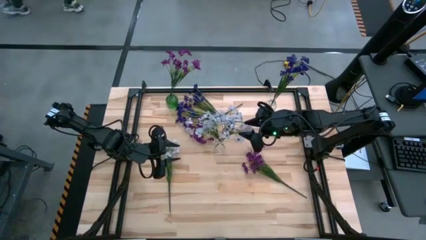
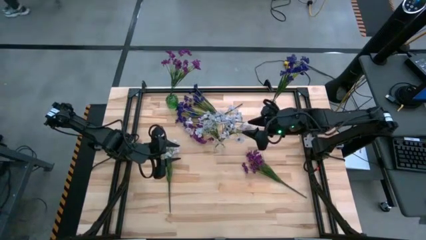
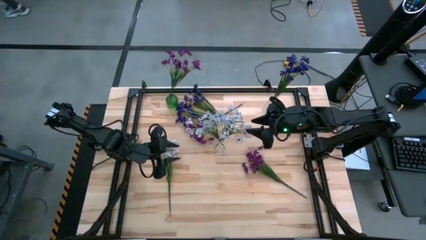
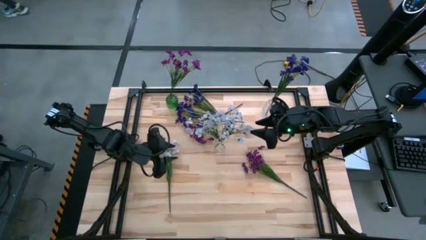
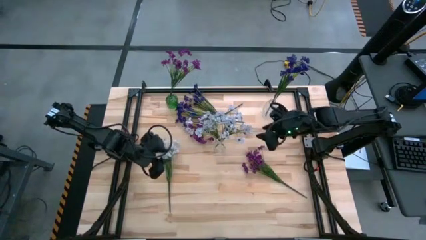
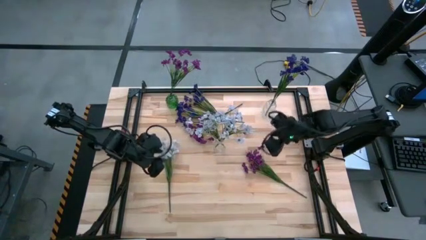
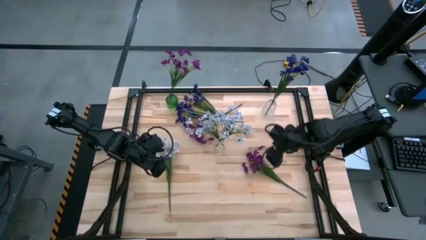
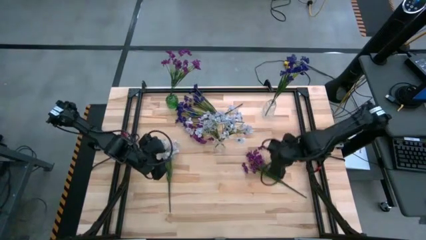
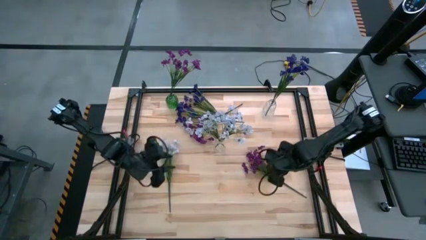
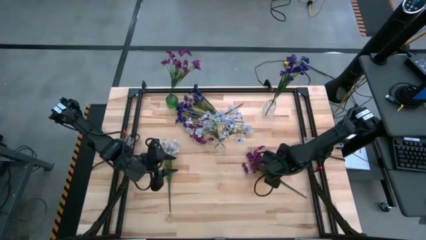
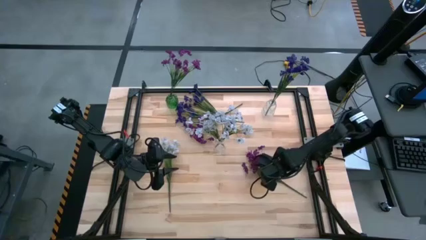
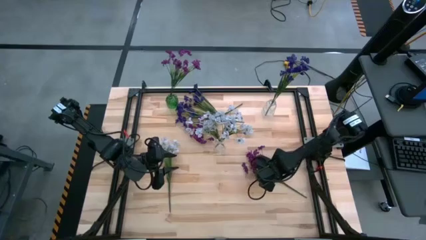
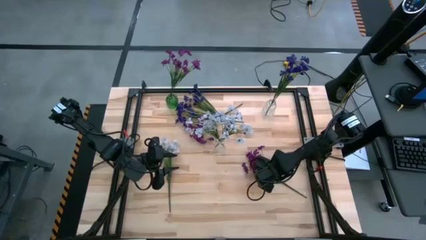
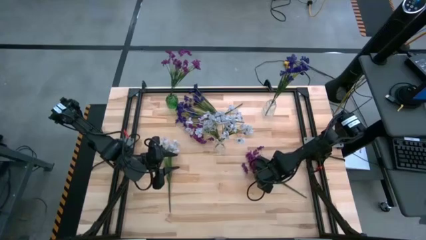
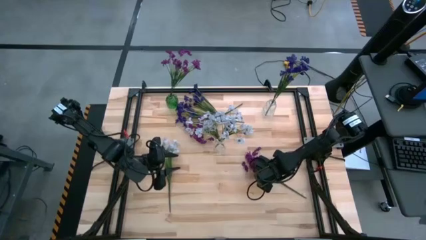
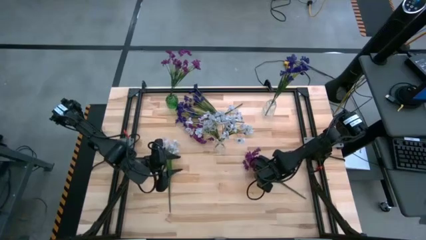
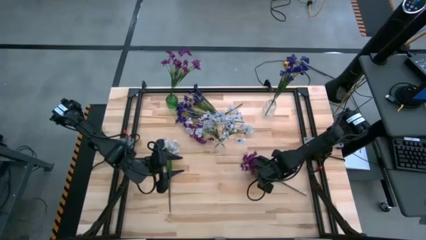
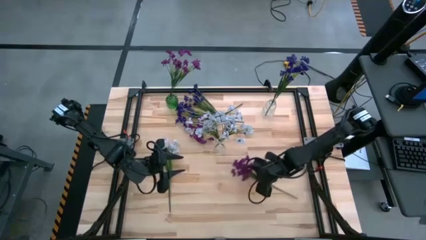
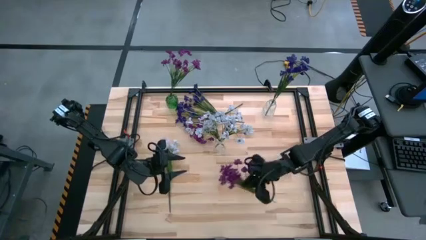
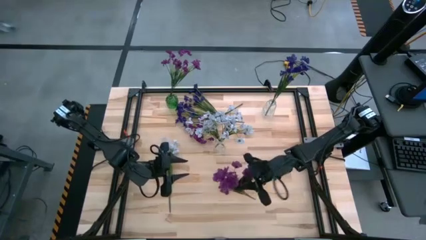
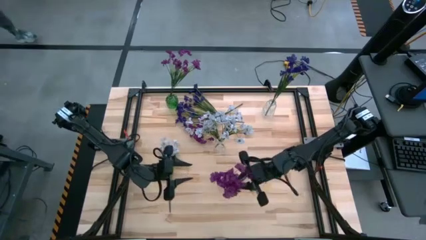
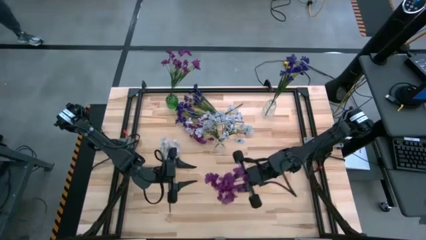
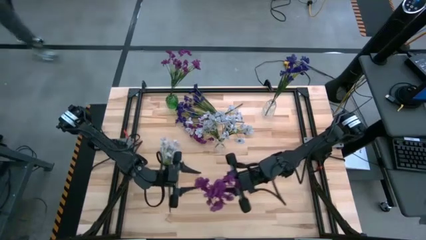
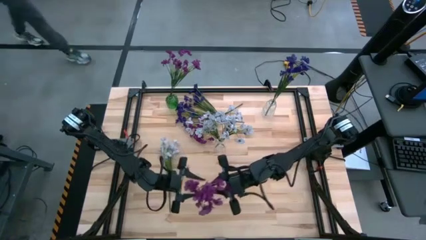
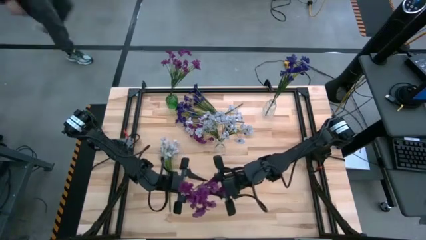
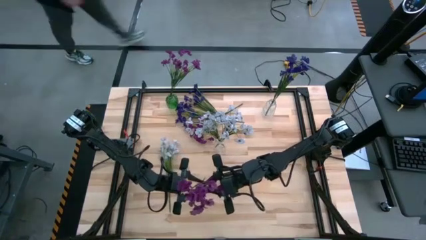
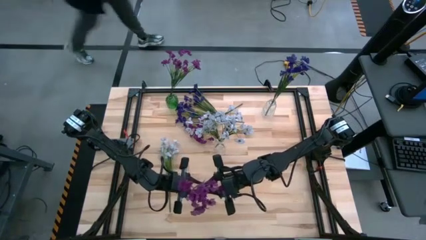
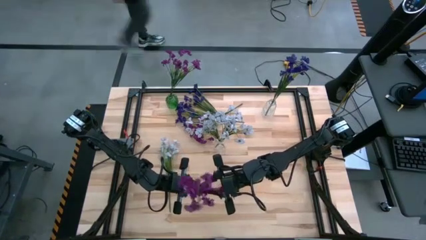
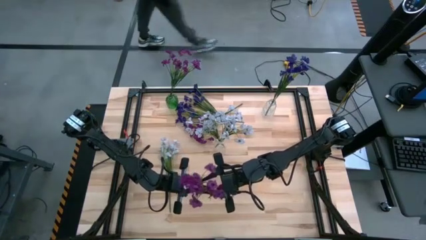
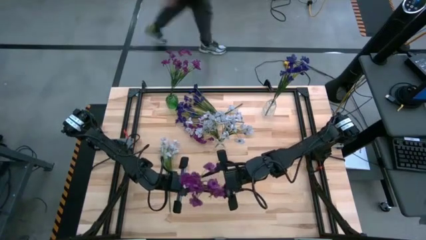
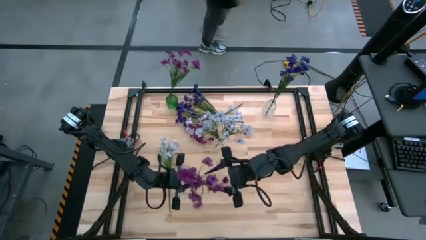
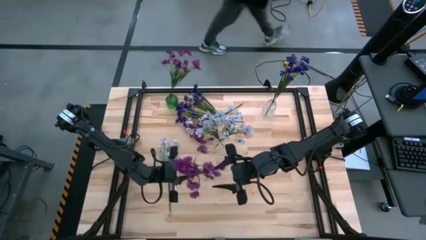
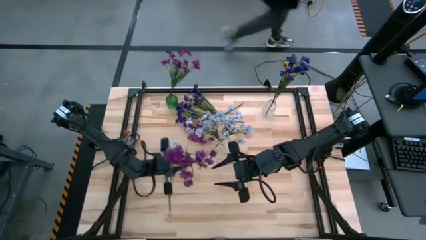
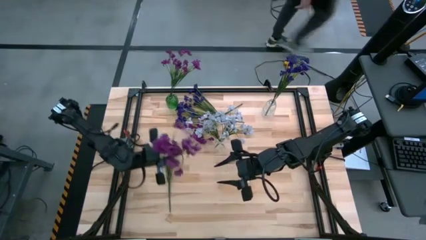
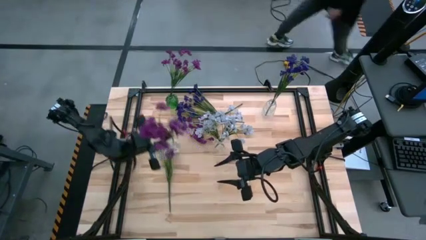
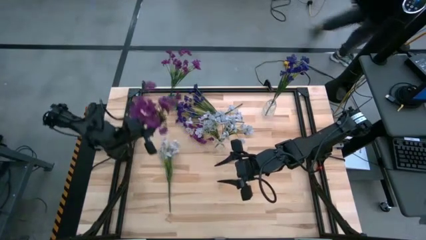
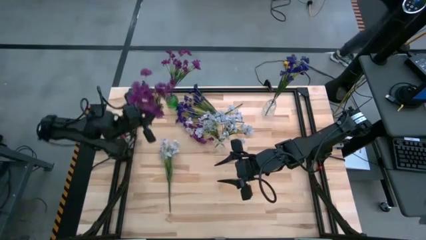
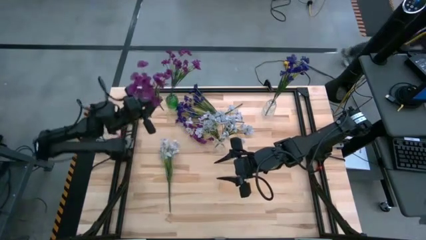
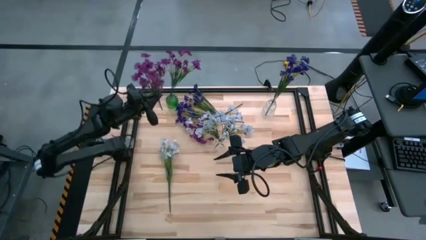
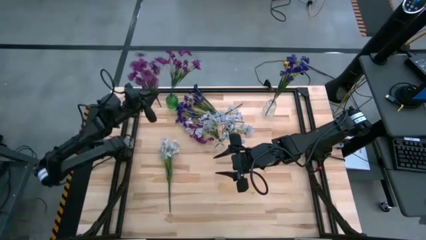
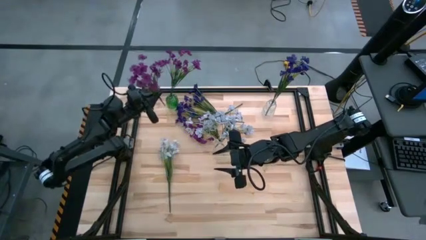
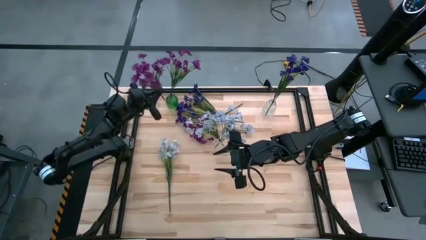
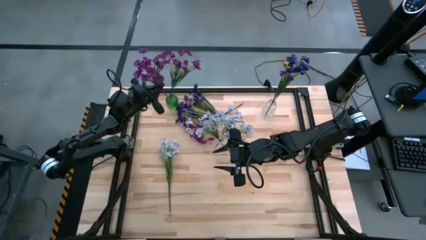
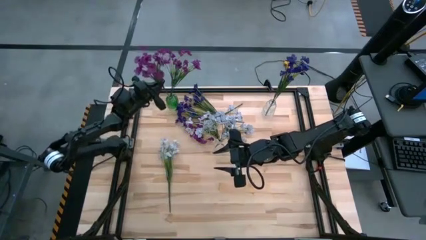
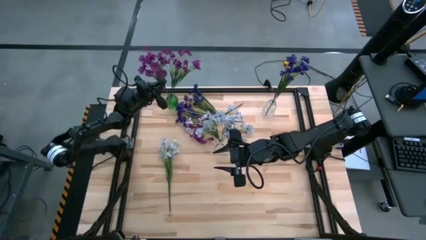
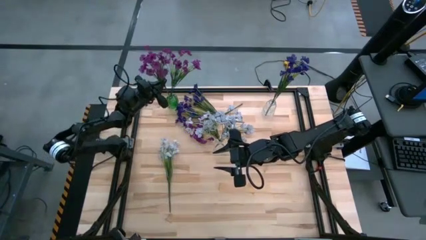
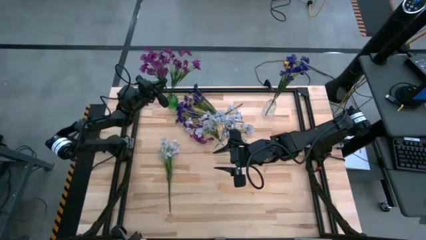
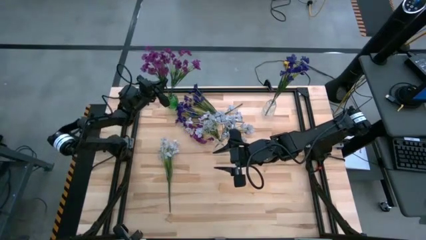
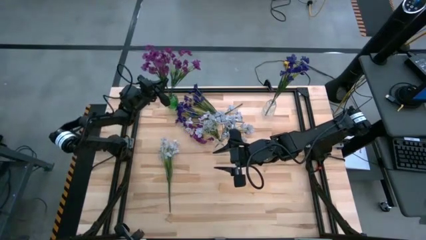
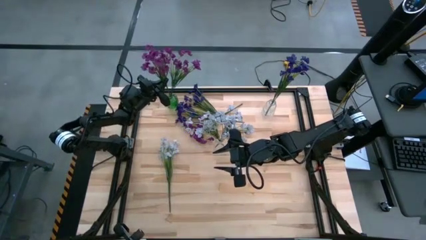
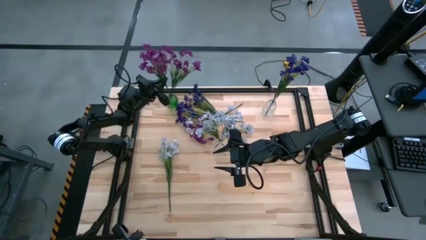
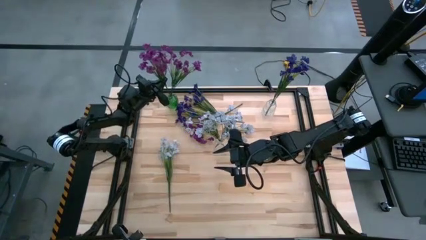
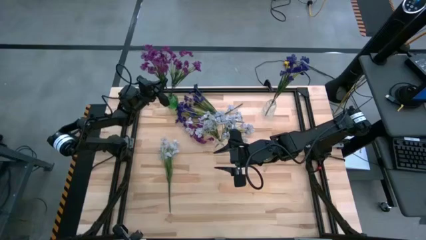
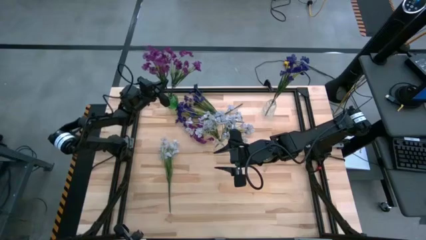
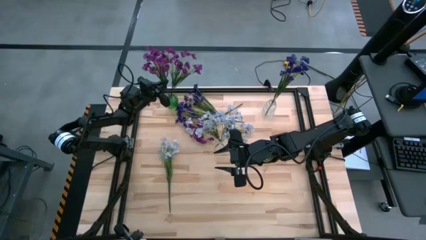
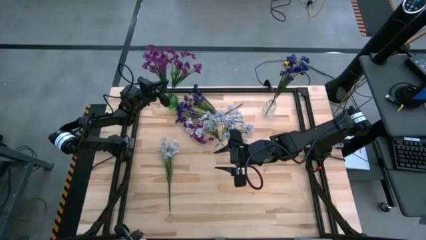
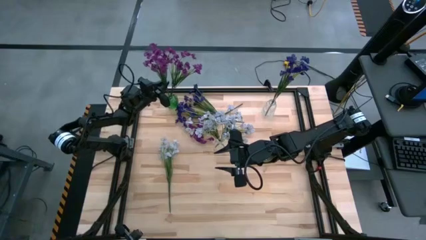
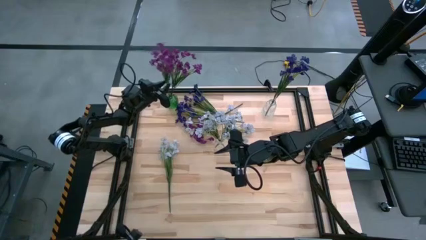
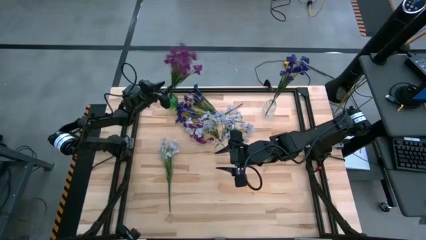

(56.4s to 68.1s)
Task: Sort flowers into vase by color
Put the bottom violet flowers into the green flower vase
